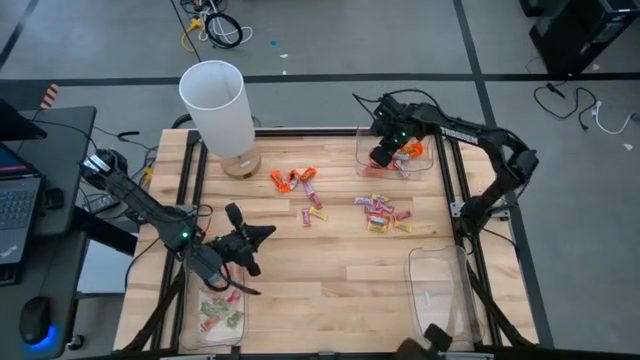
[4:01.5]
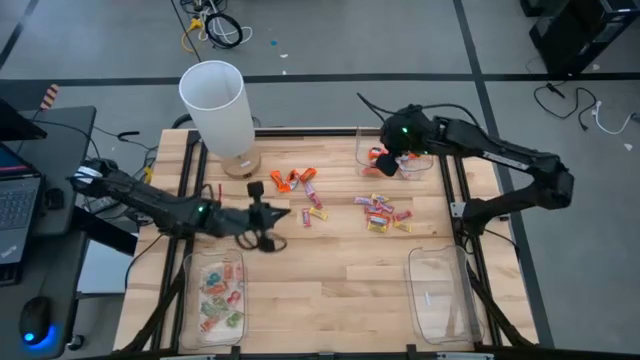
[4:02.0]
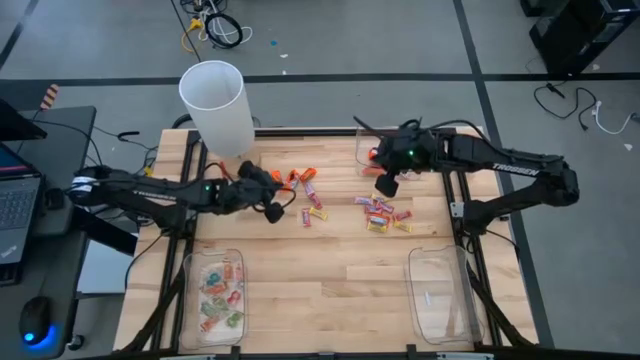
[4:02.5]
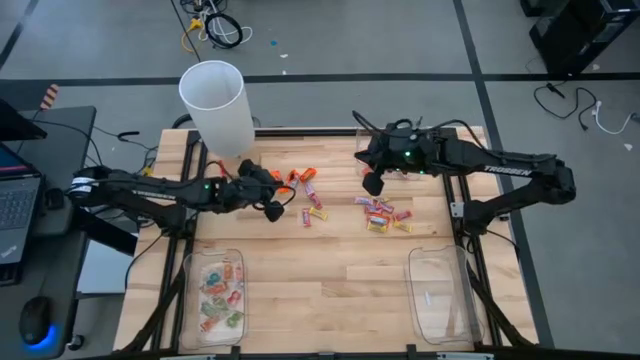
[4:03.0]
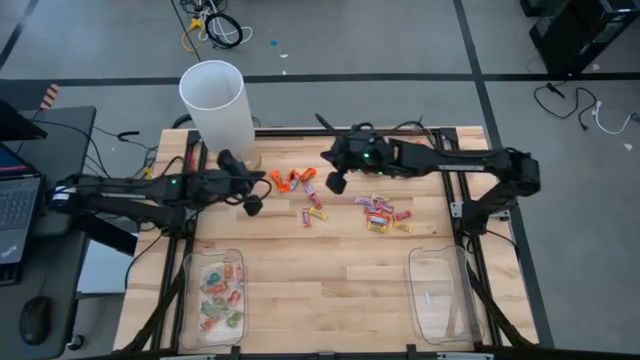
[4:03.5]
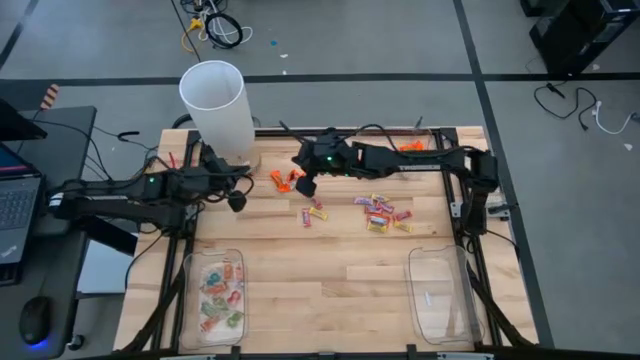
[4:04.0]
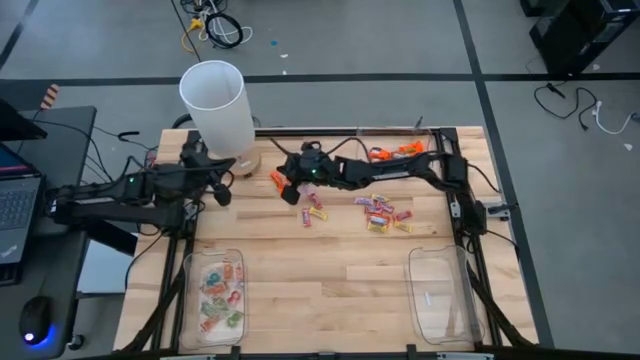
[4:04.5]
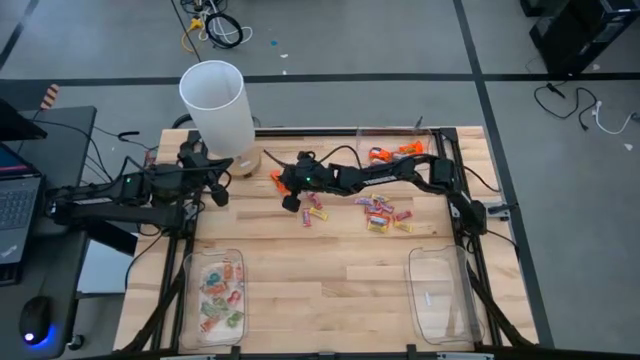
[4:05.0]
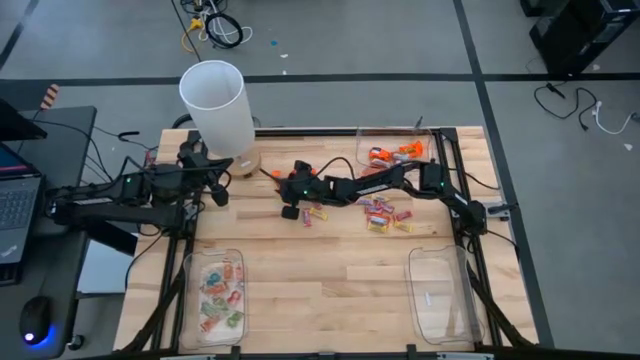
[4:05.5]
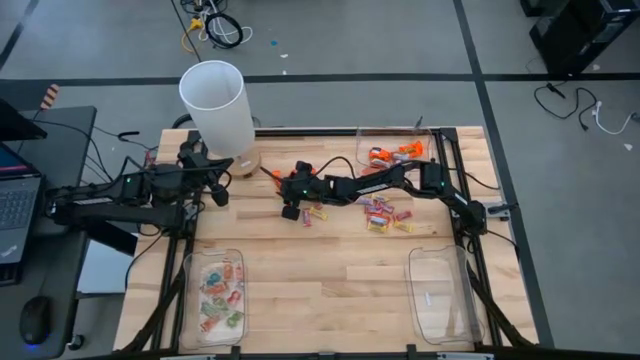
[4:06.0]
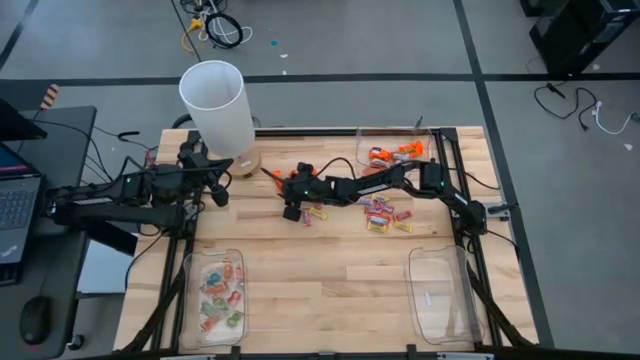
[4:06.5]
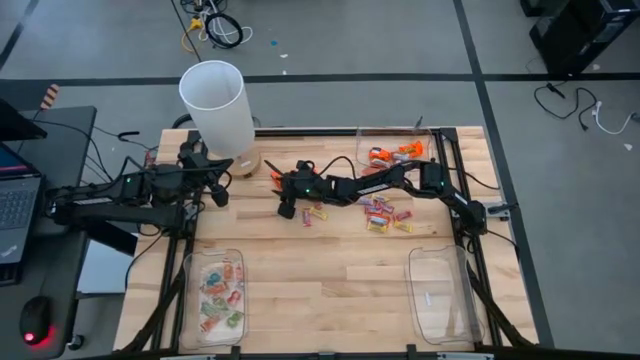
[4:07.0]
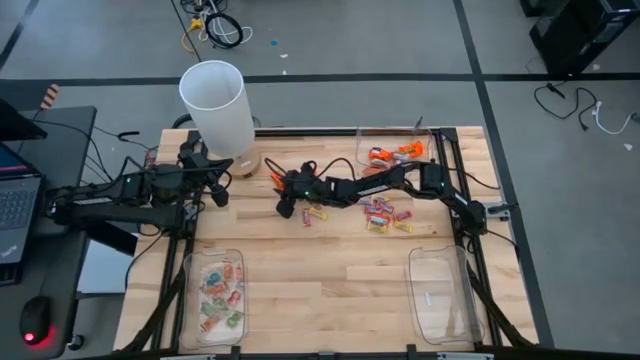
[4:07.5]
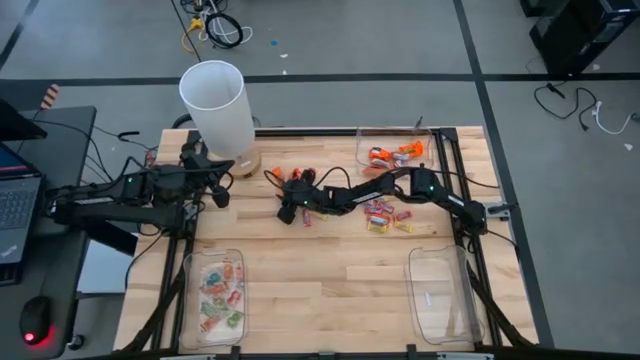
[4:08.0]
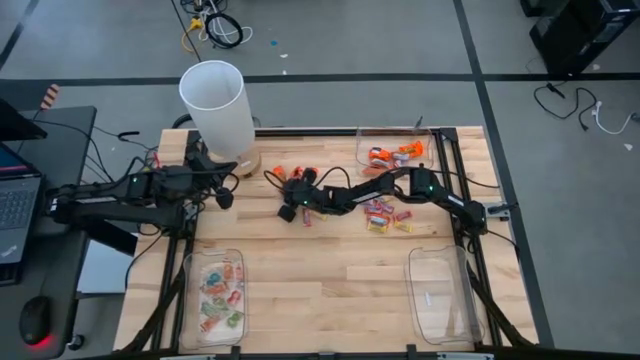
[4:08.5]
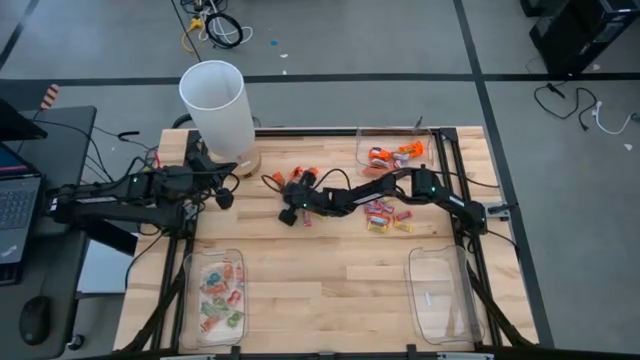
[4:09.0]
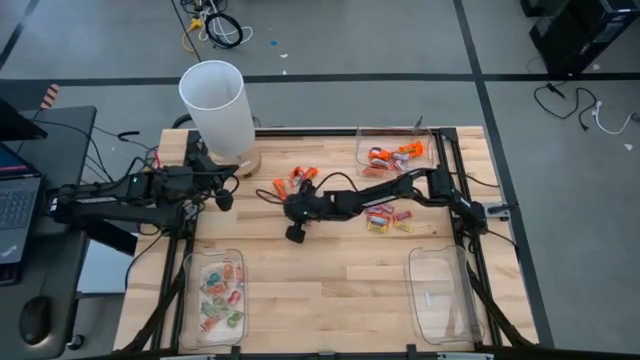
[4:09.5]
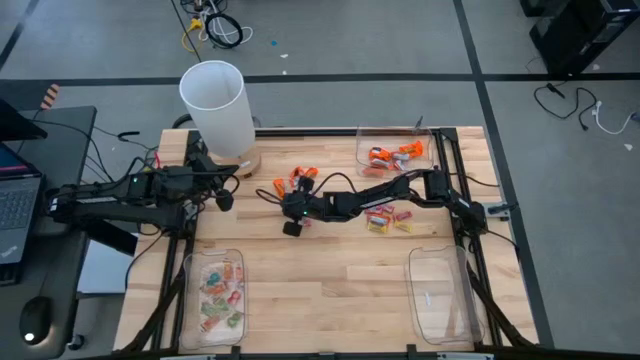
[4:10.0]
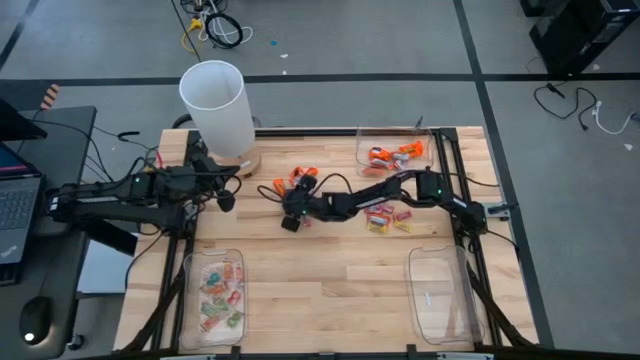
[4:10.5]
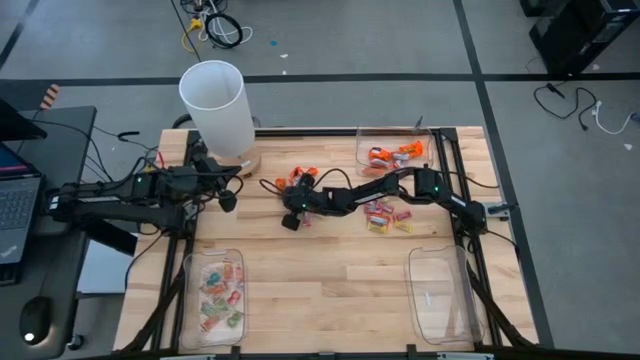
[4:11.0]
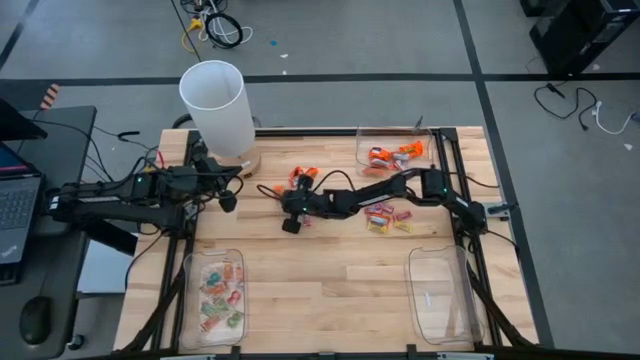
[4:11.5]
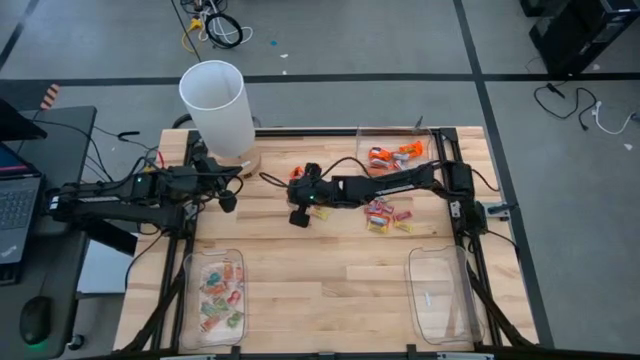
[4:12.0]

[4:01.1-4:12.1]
Task: Sort candy
Put the large orange chocolate bar into the top right transparent bin

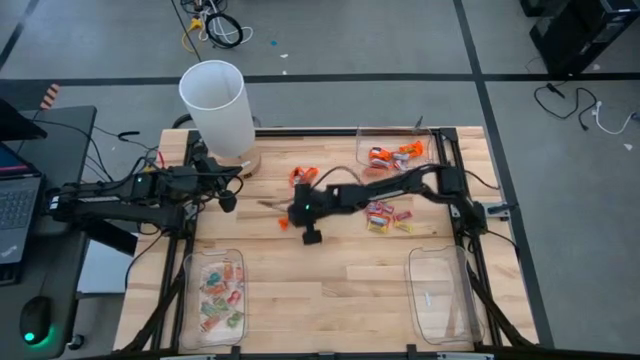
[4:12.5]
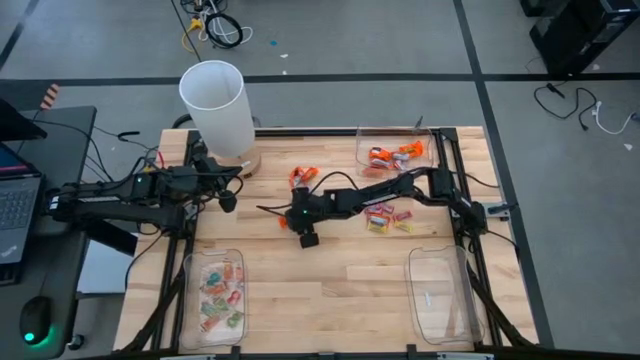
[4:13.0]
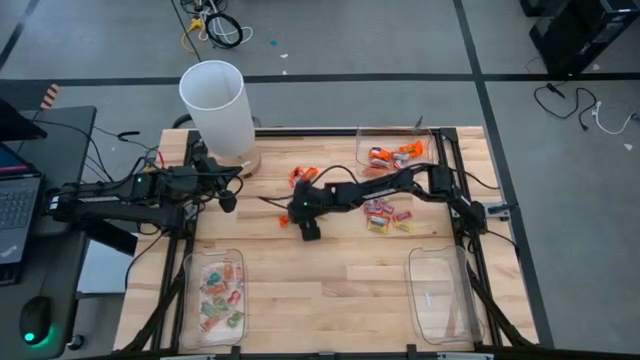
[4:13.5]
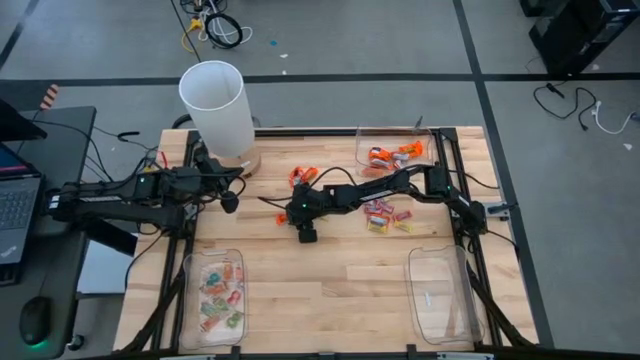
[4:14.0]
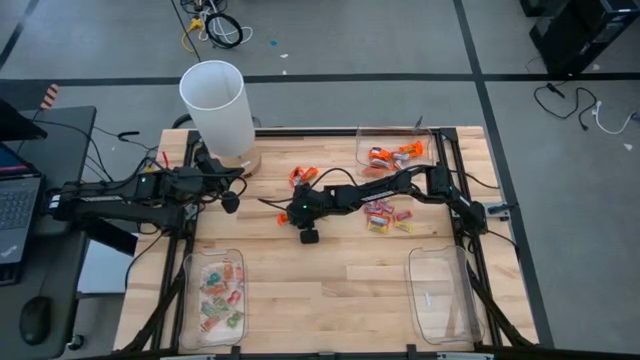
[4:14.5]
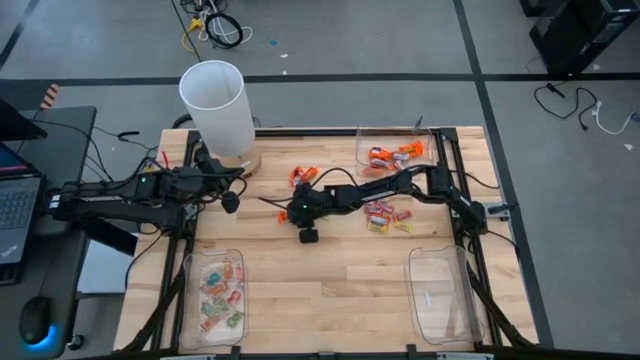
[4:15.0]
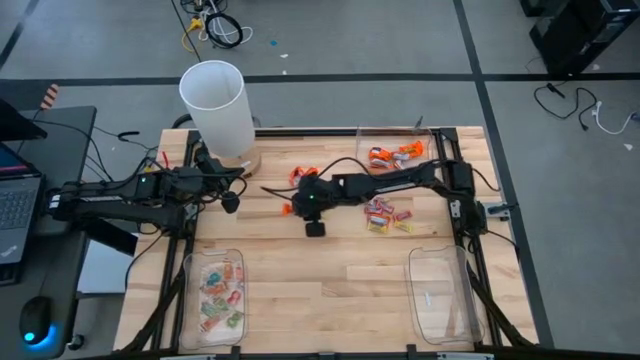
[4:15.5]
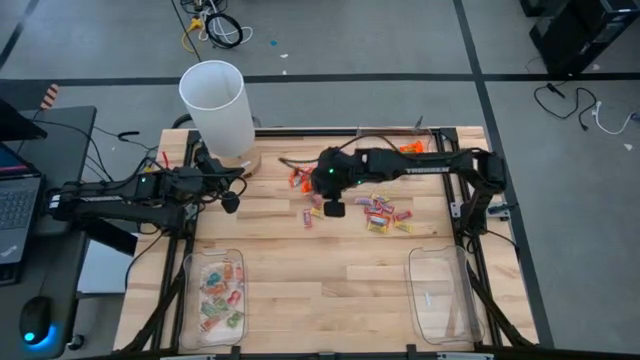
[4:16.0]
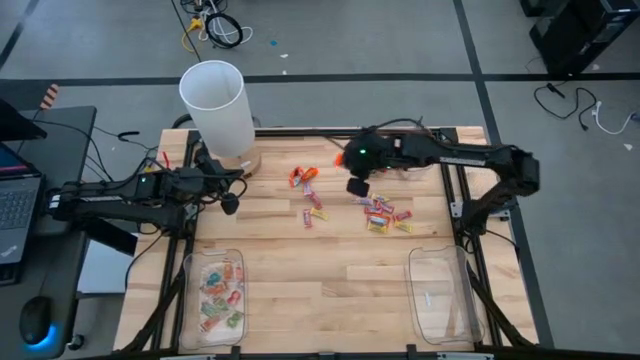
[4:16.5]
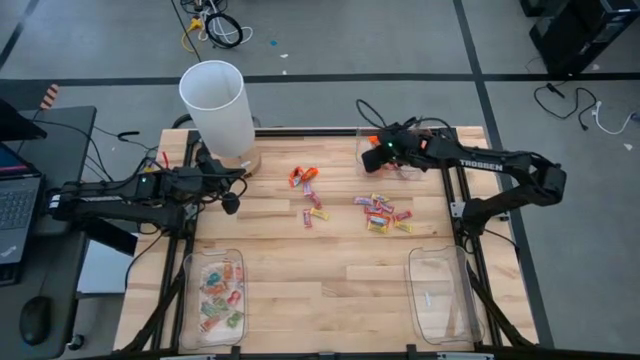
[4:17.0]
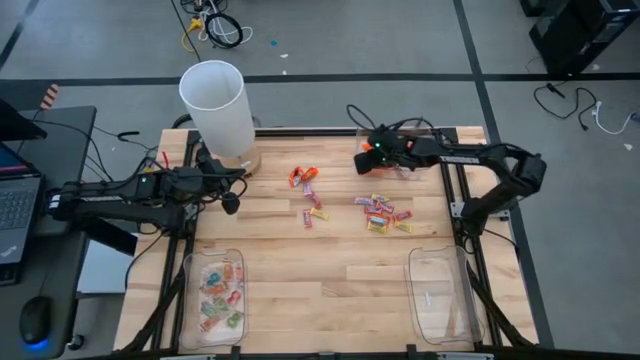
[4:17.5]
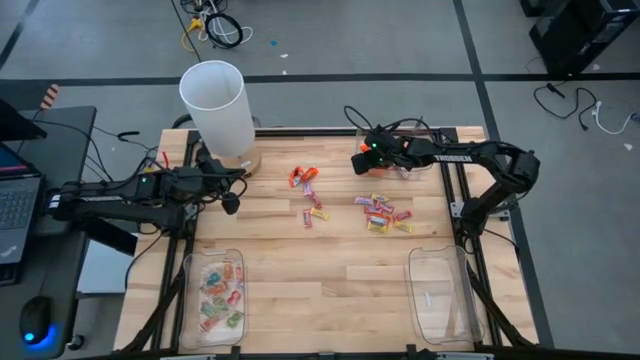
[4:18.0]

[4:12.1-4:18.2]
Put the large orange chocolate bar into the top right transparent bin

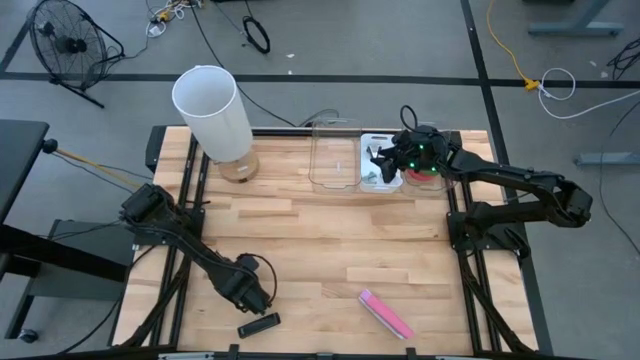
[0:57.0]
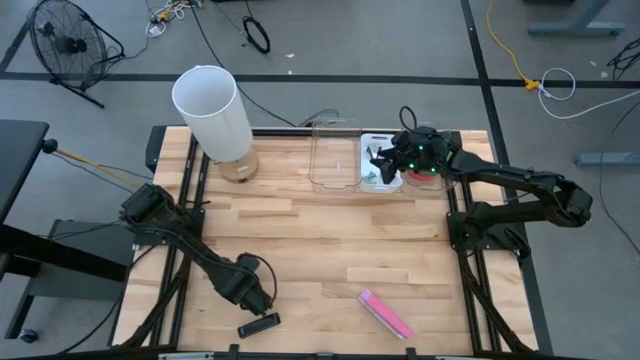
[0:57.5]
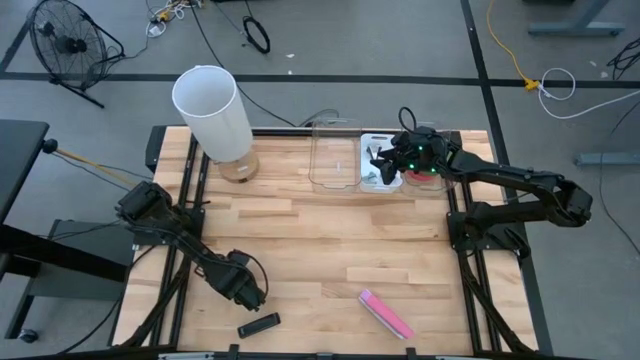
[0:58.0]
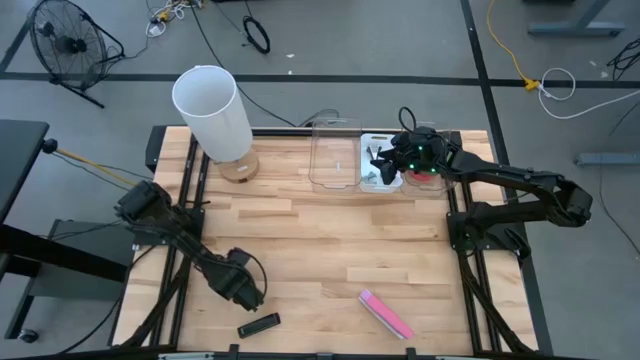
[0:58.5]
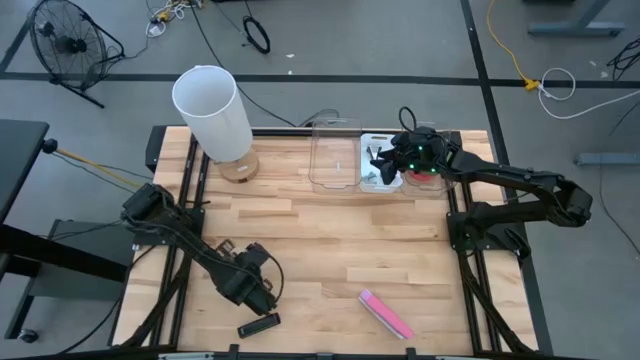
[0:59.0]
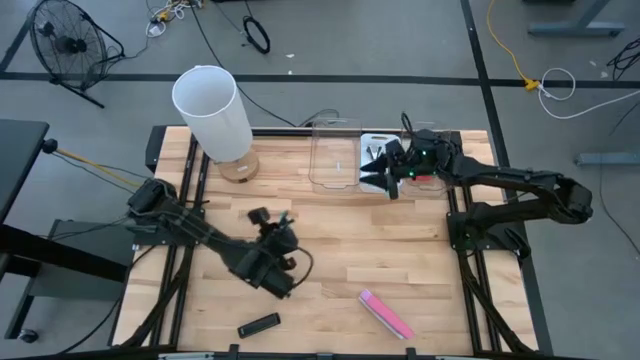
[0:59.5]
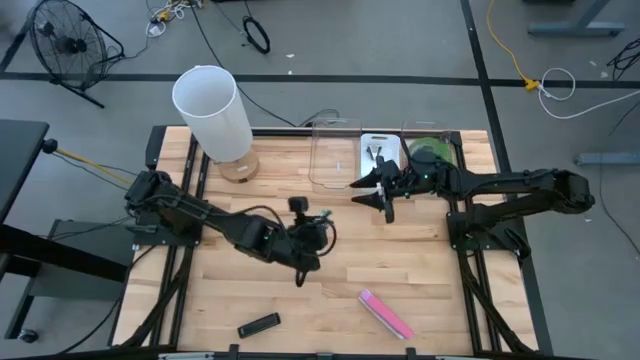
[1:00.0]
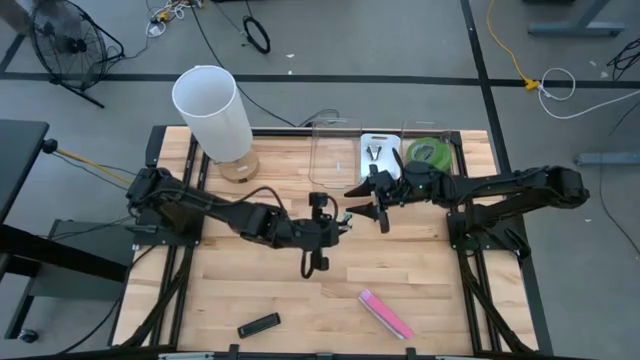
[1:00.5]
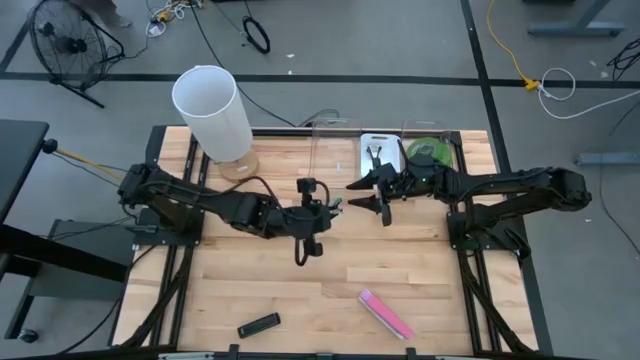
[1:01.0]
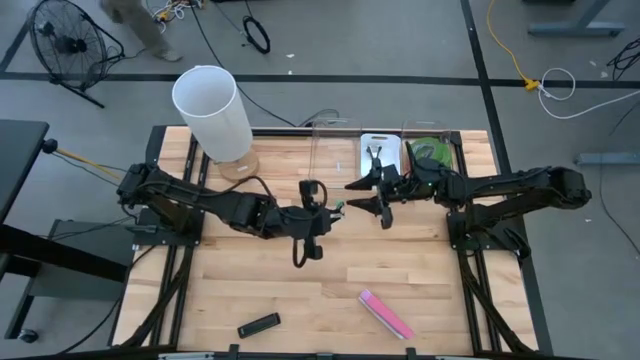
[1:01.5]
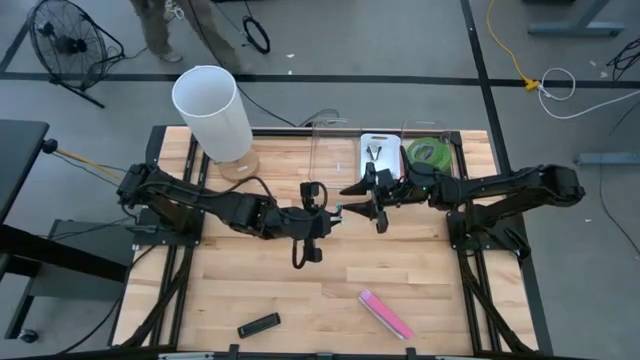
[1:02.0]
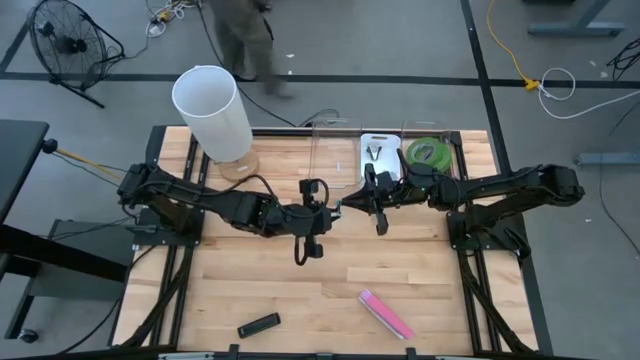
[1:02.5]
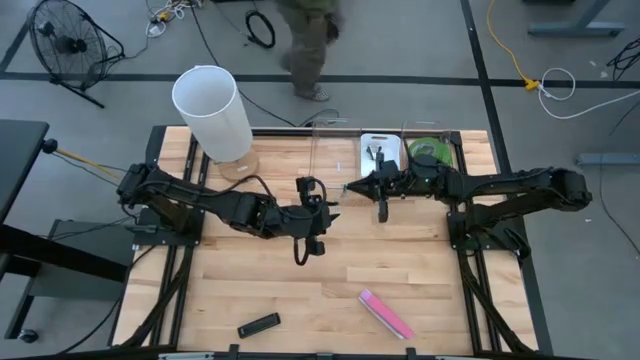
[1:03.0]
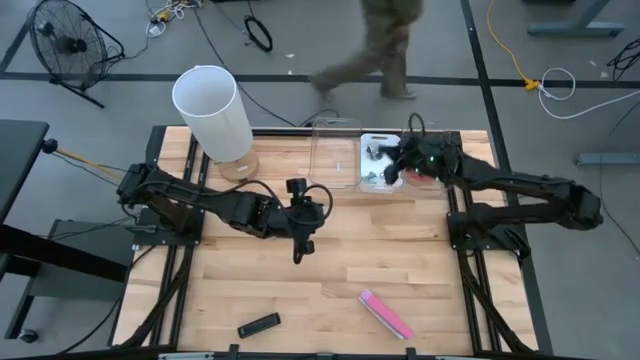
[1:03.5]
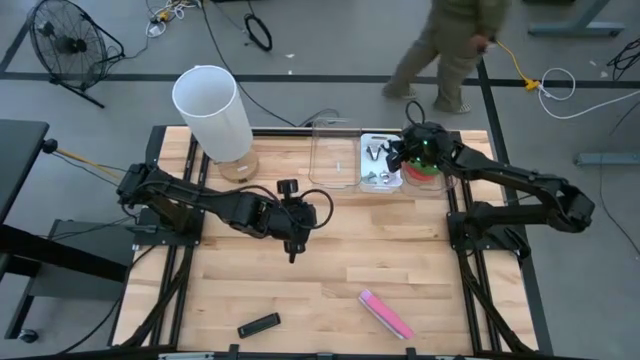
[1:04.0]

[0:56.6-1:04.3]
Task: Pick and place Stapler, Stapler remover, tape
Put the light blue staple remover into the white bin
